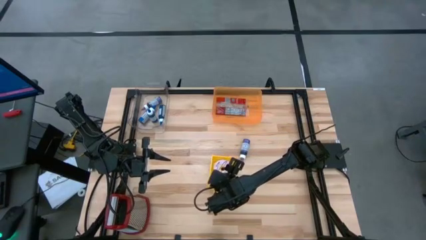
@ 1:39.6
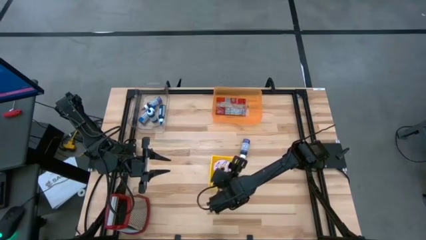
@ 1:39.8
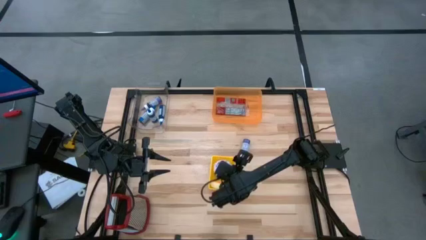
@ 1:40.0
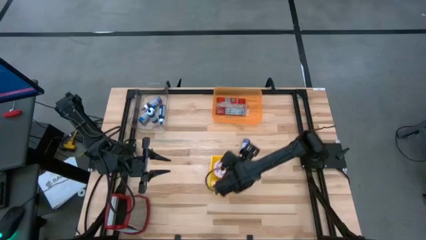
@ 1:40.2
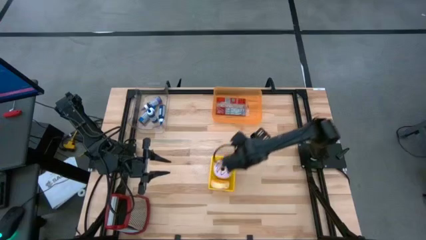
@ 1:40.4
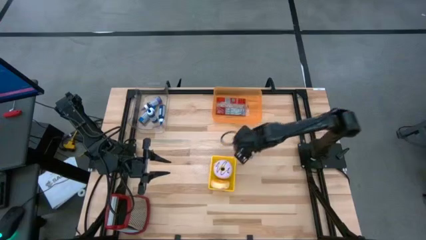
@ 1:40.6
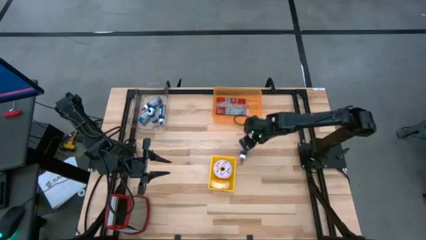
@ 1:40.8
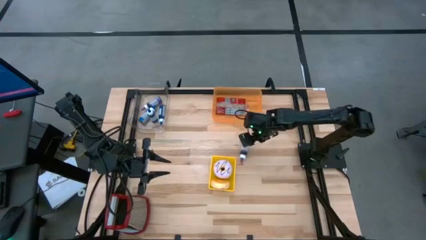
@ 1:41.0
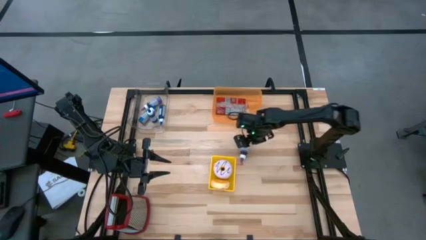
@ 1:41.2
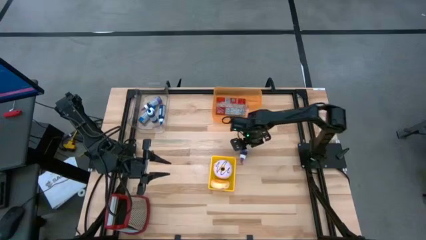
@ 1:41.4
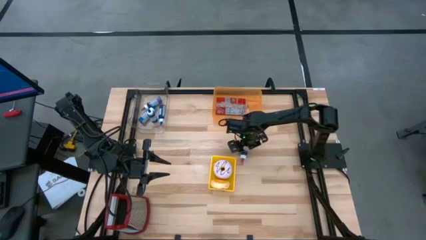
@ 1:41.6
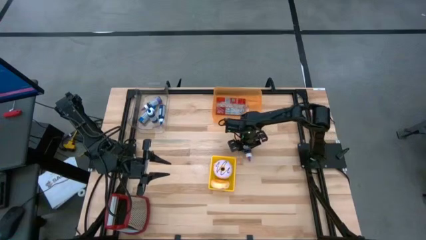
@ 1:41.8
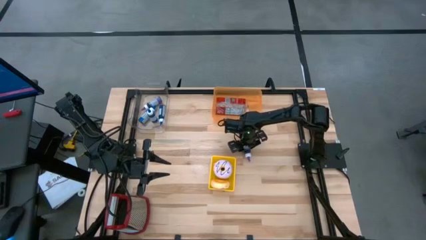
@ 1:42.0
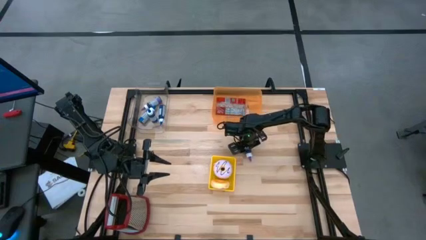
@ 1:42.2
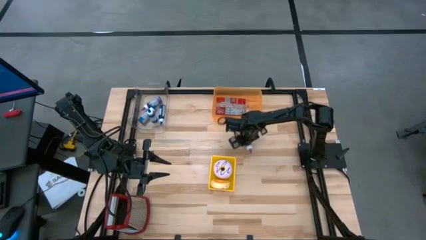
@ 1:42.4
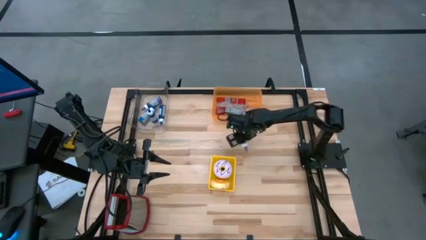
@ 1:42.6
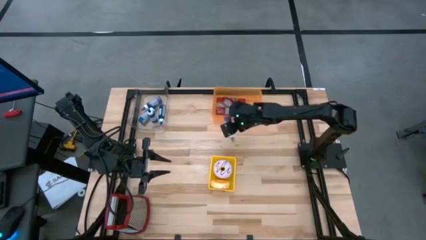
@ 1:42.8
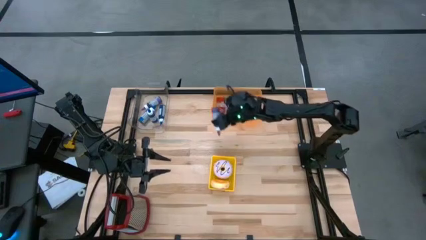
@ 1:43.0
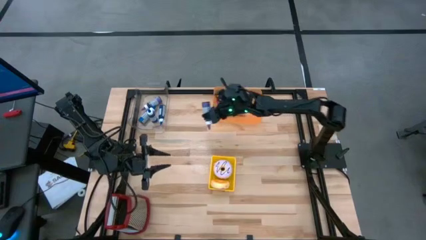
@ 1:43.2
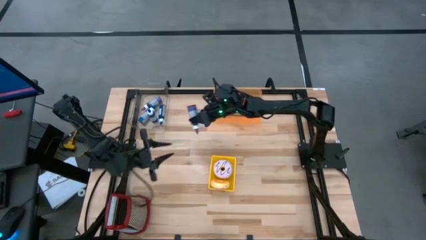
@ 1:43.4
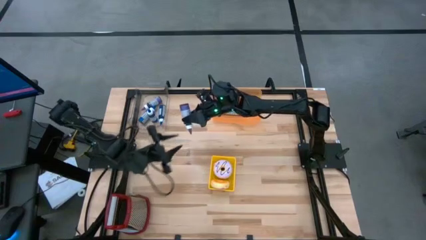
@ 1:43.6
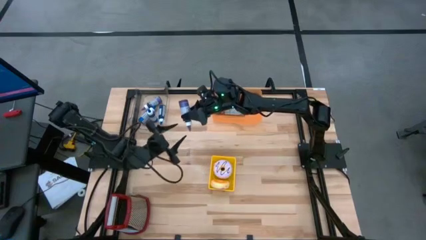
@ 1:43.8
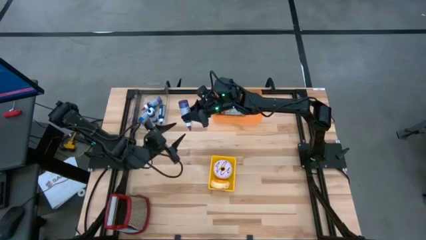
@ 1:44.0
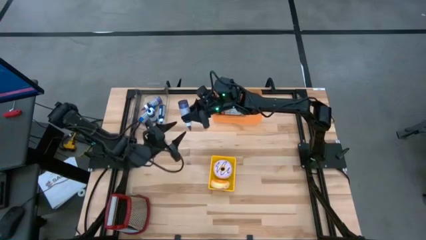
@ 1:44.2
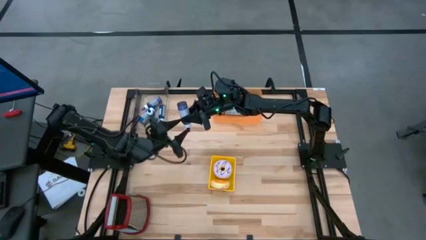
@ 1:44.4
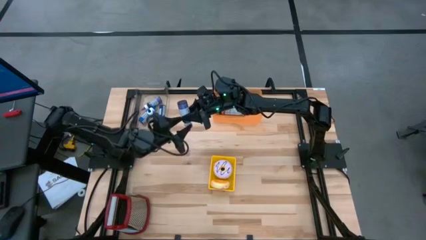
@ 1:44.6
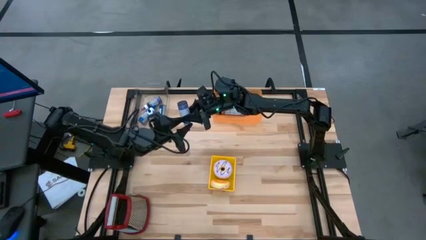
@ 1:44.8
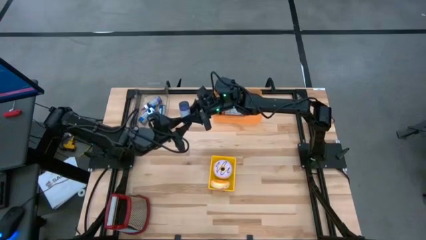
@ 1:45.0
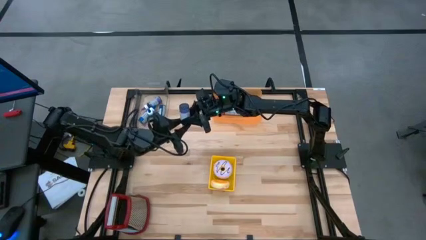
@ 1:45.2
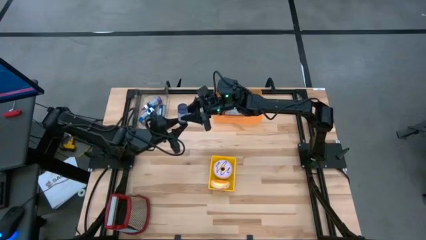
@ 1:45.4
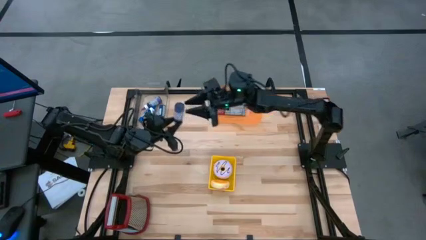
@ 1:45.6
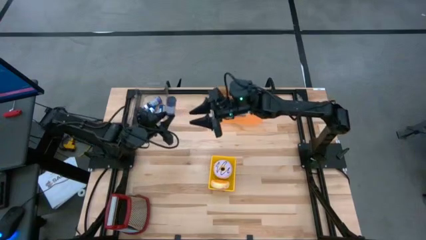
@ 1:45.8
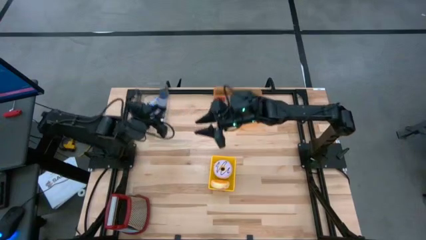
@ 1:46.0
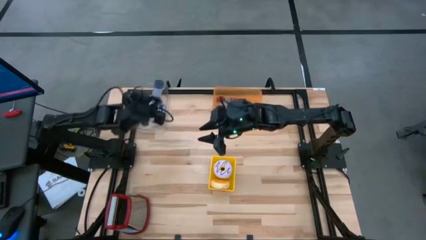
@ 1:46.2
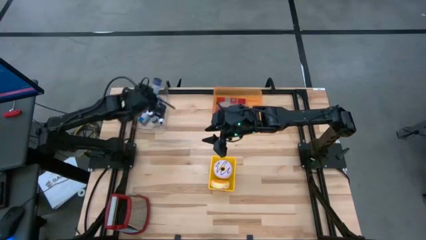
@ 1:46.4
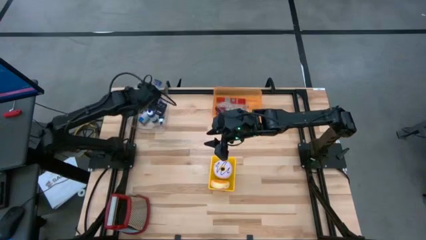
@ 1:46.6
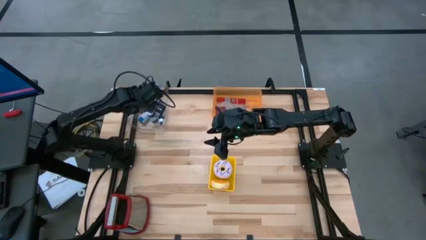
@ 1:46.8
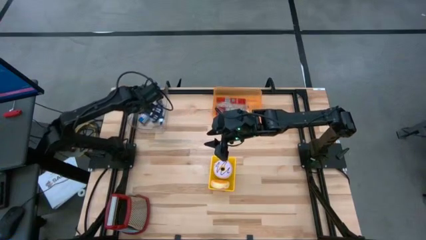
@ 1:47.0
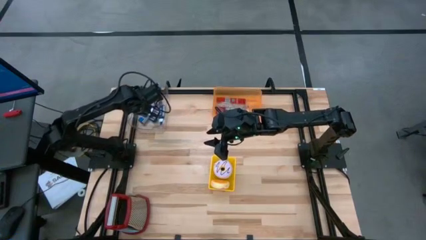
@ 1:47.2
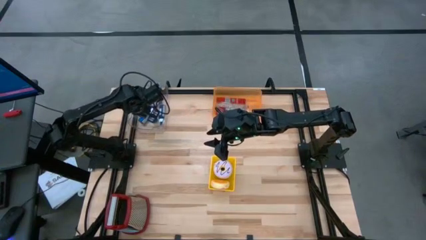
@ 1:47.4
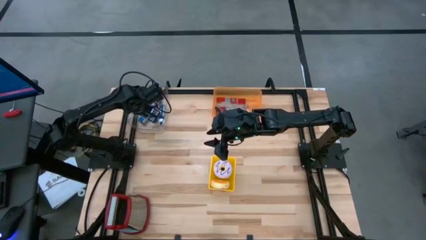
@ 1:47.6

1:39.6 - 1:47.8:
Put the purple food coloring bottle into the transparent bin

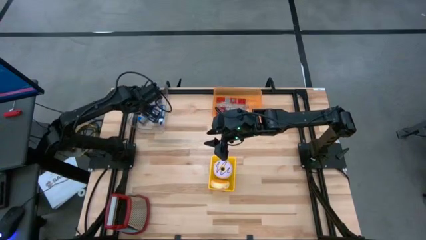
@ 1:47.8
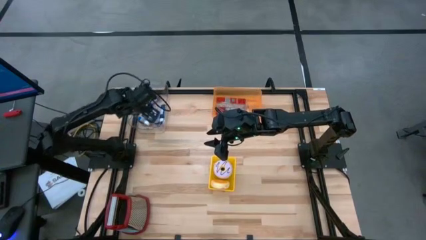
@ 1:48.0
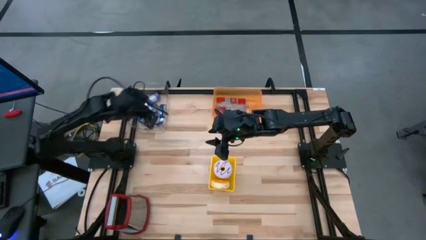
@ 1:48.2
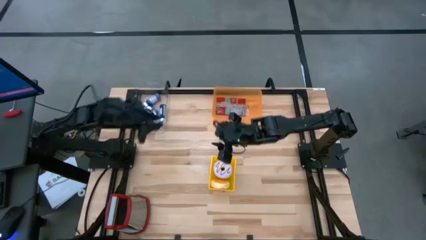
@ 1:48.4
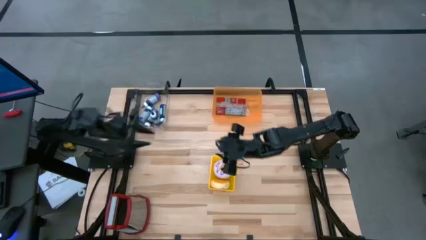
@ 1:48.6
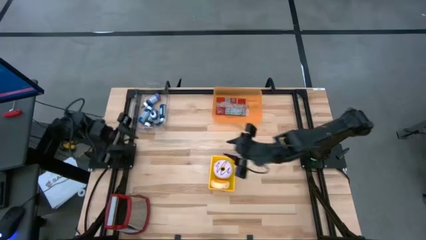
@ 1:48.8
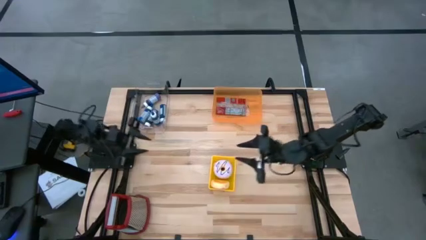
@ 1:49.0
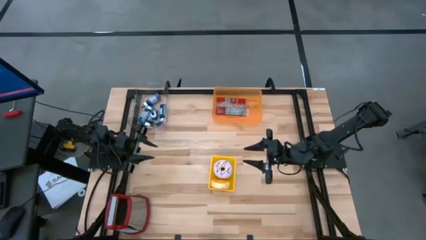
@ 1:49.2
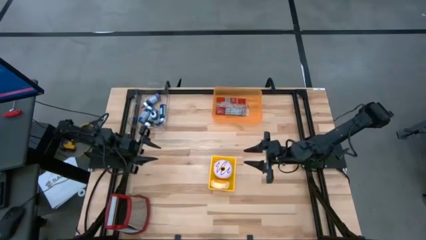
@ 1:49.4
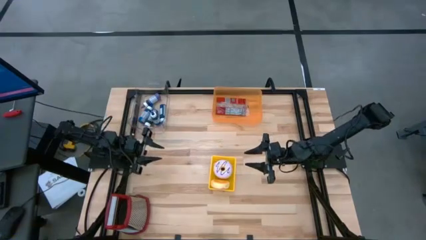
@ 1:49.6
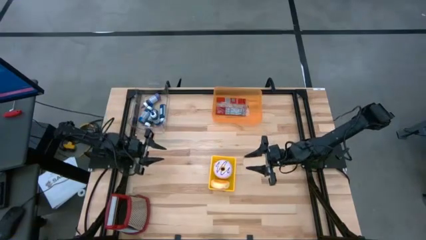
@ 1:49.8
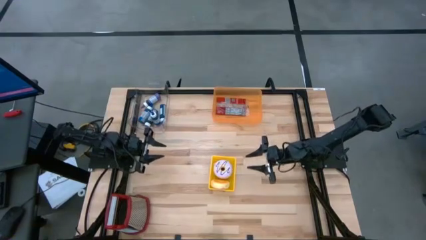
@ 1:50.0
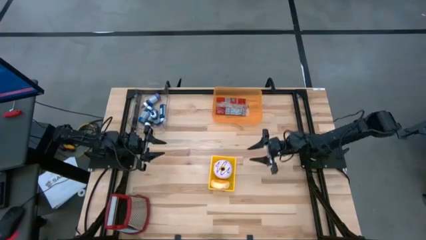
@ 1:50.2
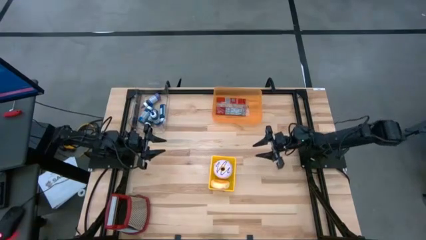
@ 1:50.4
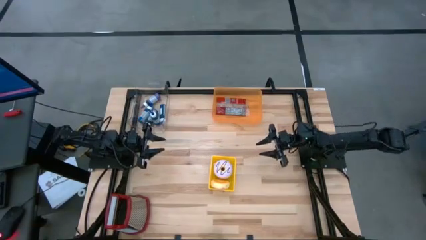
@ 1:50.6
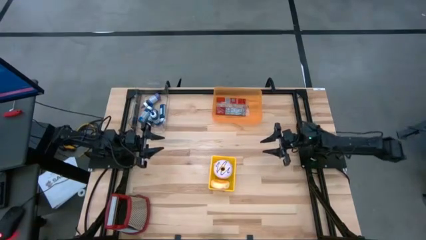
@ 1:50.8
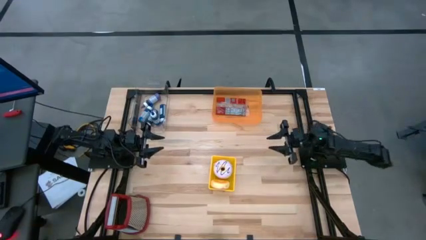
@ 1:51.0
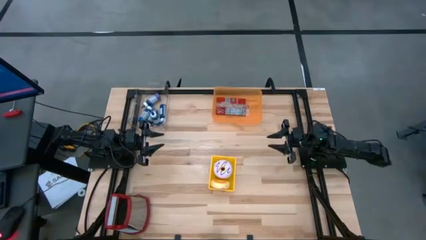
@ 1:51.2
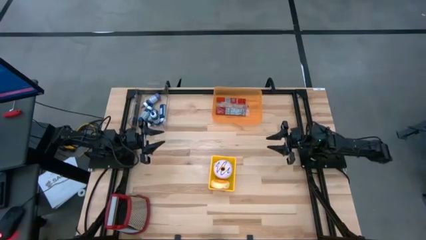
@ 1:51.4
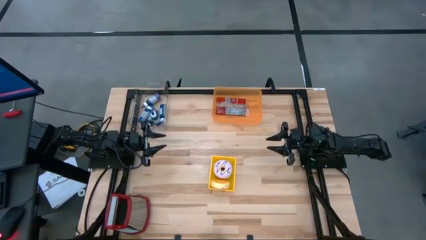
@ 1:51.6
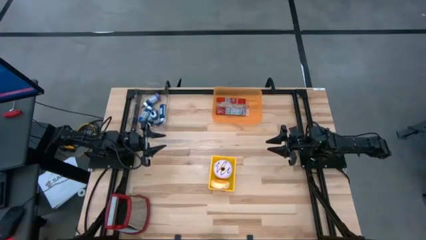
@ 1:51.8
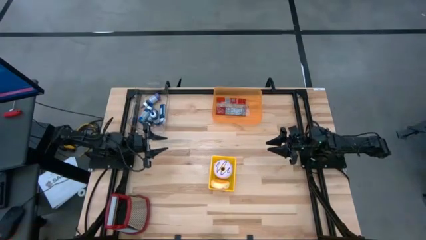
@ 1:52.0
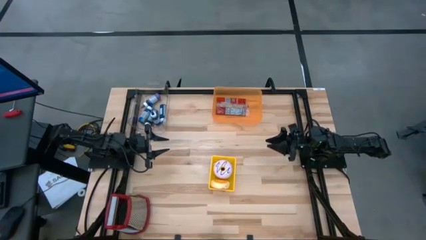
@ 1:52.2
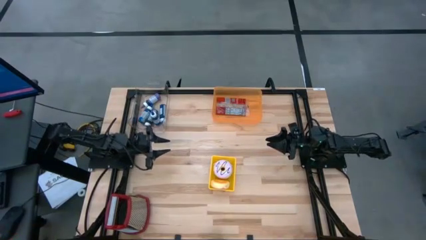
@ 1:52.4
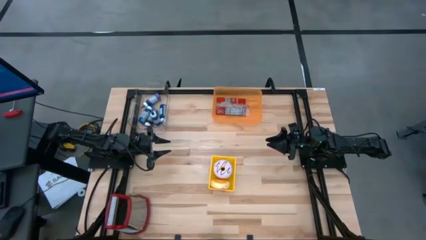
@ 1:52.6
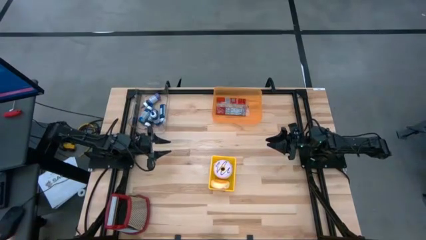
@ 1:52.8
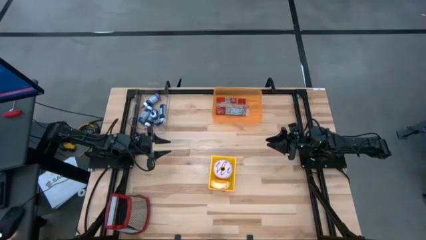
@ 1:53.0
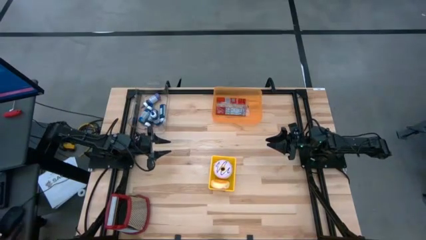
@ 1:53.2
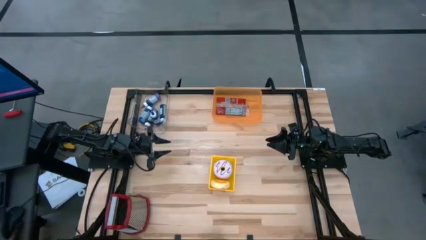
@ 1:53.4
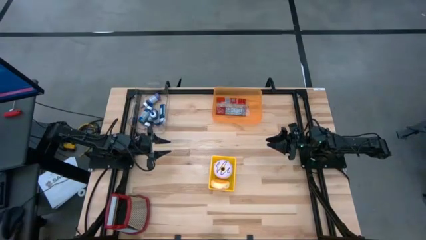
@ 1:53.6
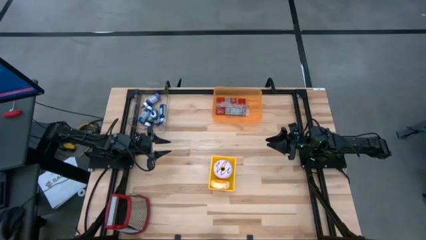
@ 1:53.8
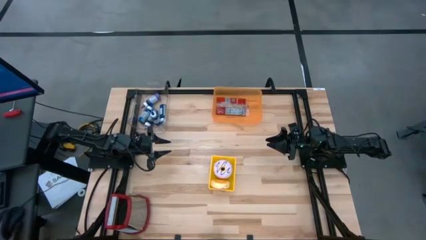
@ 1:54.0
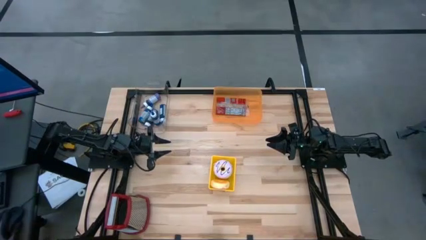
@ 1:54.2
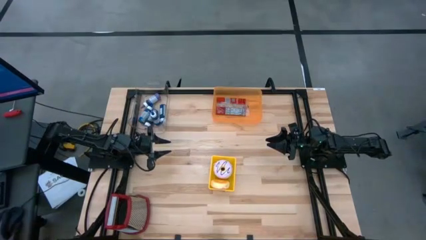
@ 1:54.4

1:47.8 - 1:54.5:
Return to Home Position
